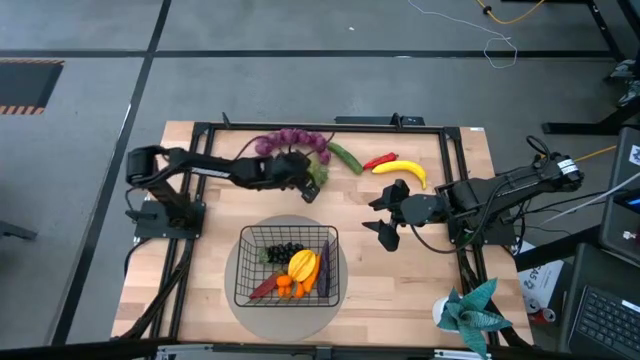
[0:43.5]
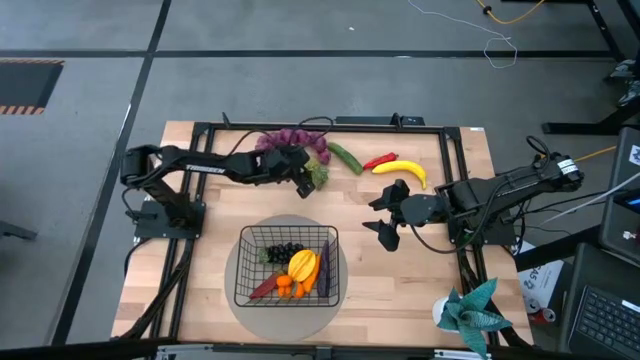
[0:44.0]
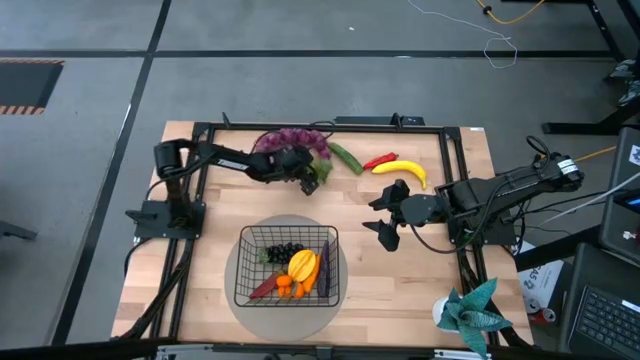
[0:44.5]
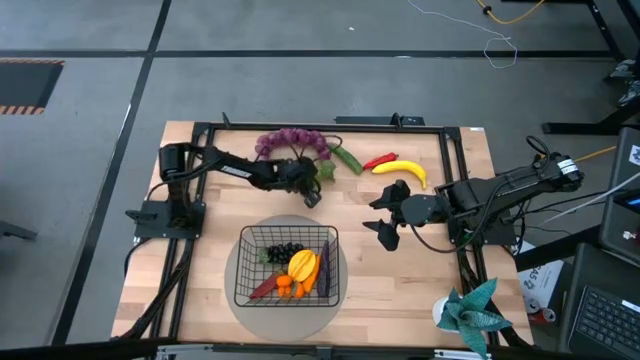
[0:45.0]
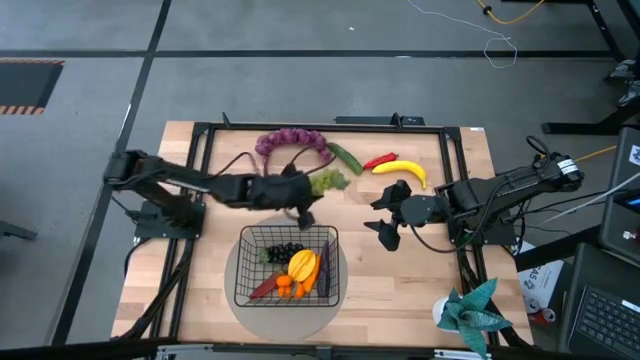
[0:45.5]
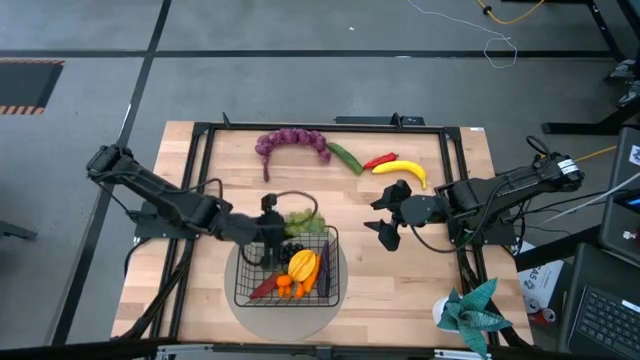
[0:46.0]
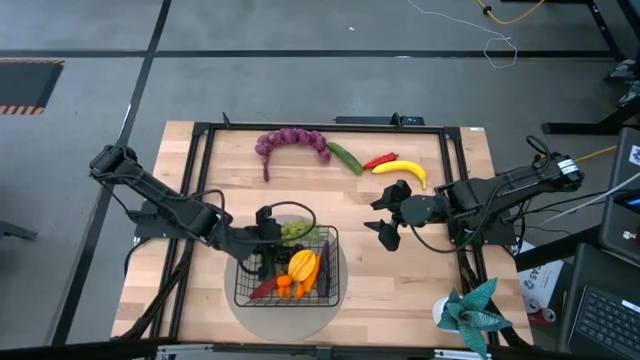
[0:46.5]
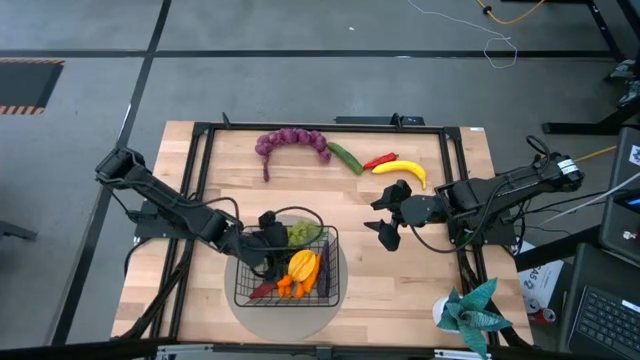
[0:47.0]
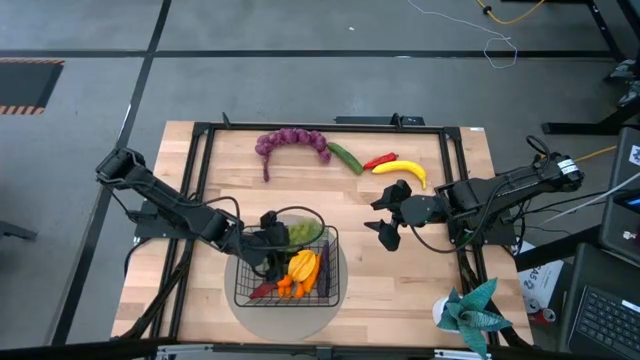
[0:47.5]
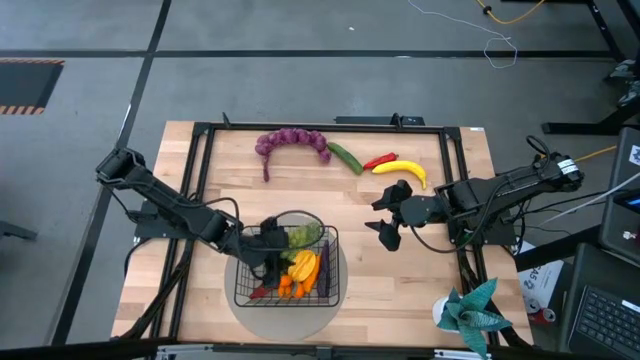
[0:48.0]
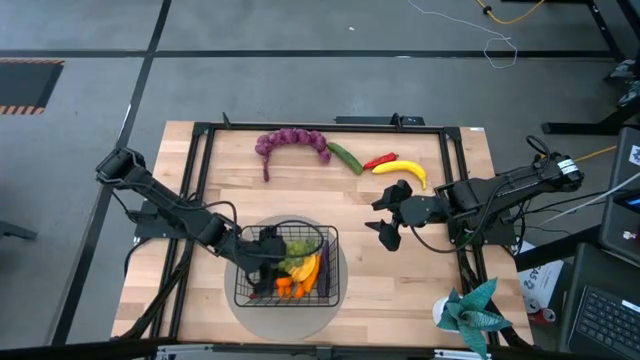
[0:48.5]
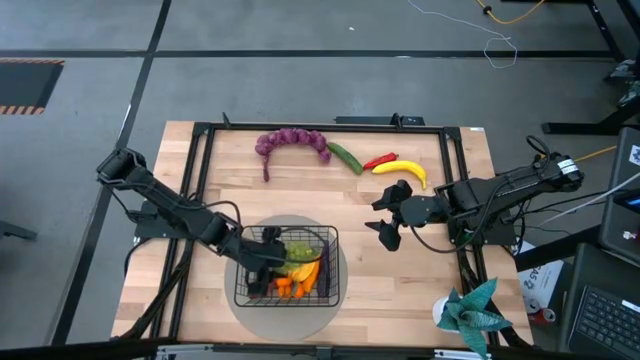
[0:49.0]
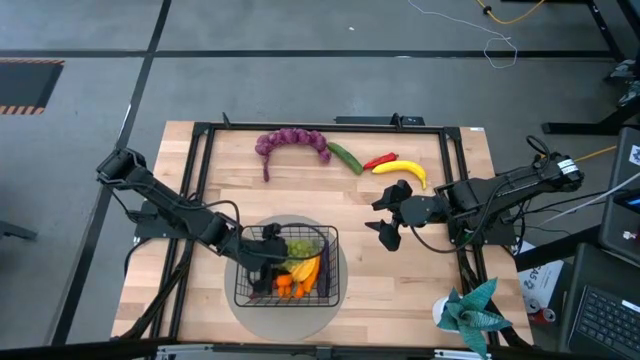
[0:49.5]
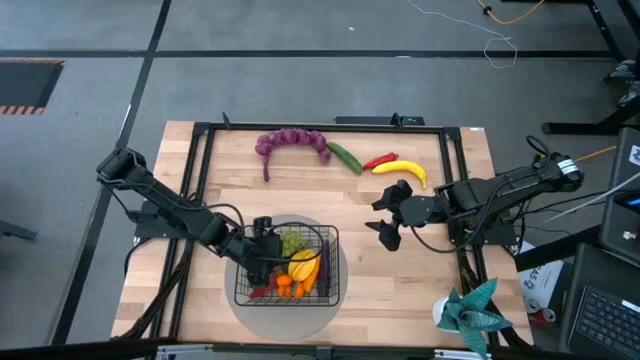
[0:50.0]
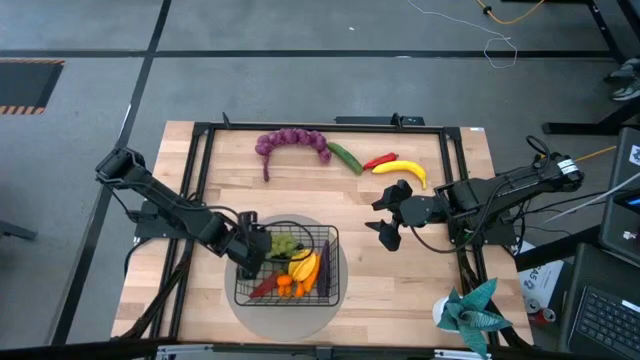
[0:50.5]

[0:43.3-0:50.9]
Task: Build produce basket
Put the green grapes into the black wire basket

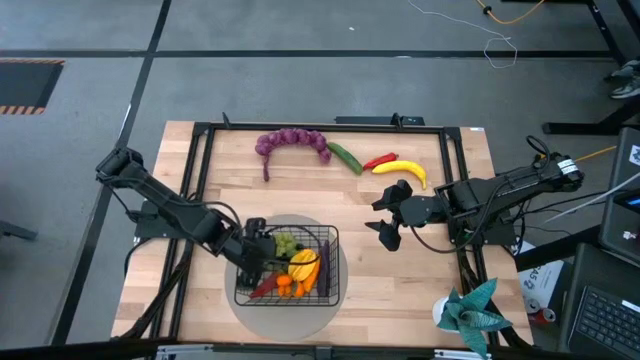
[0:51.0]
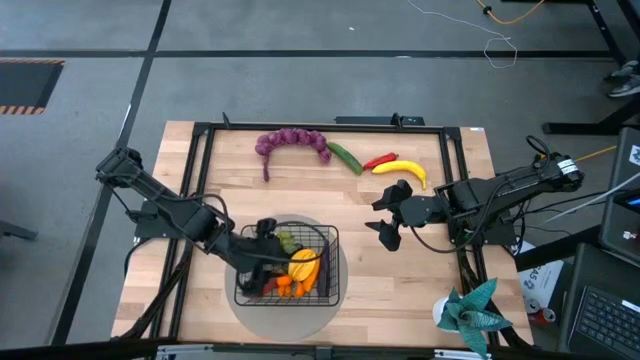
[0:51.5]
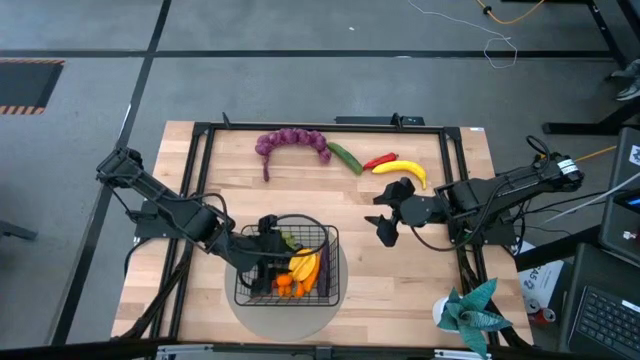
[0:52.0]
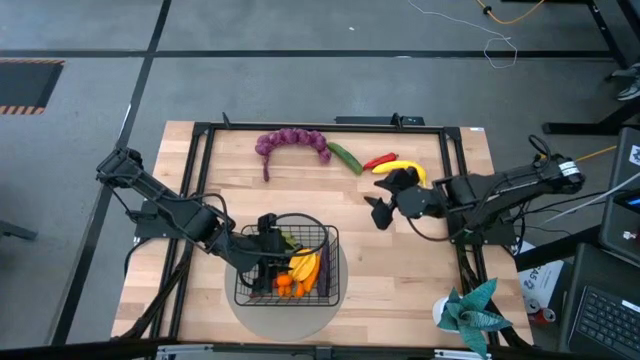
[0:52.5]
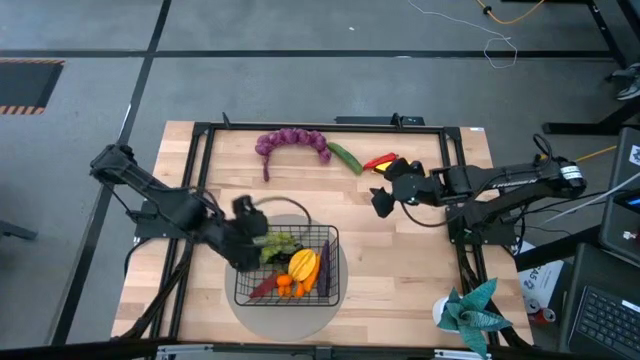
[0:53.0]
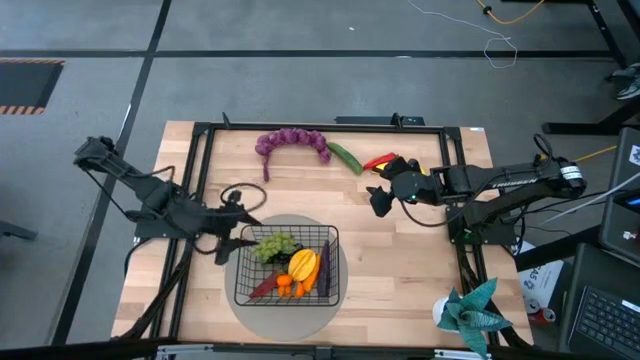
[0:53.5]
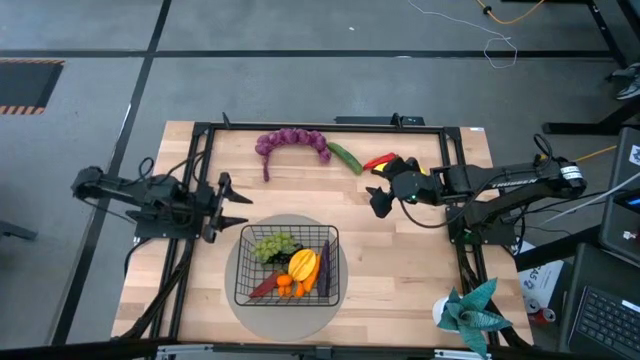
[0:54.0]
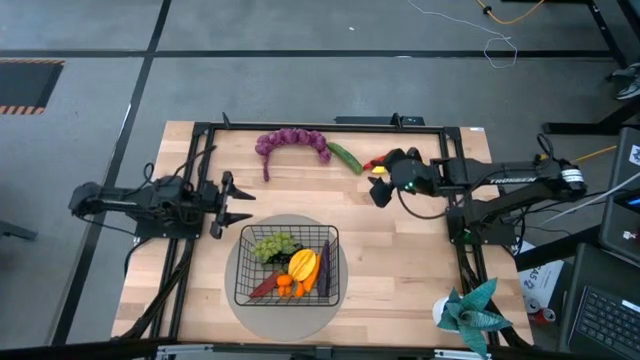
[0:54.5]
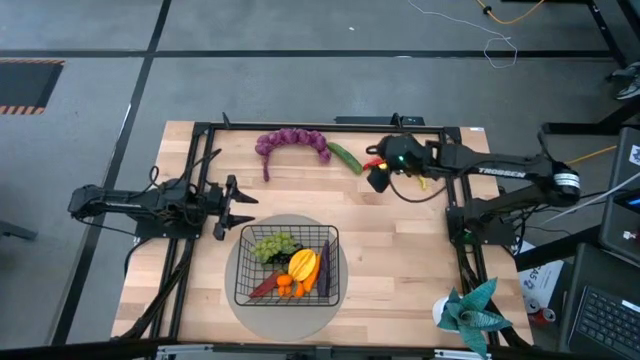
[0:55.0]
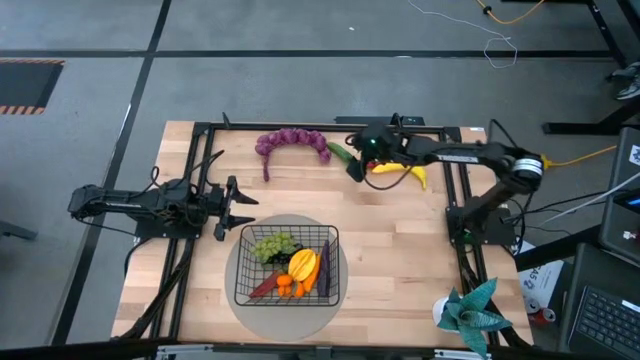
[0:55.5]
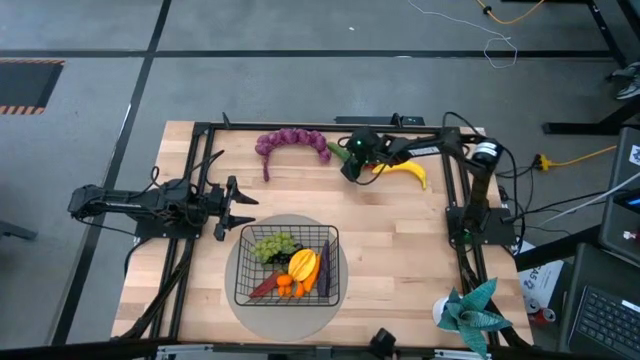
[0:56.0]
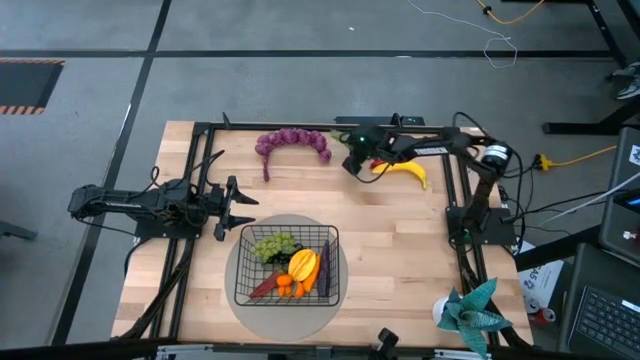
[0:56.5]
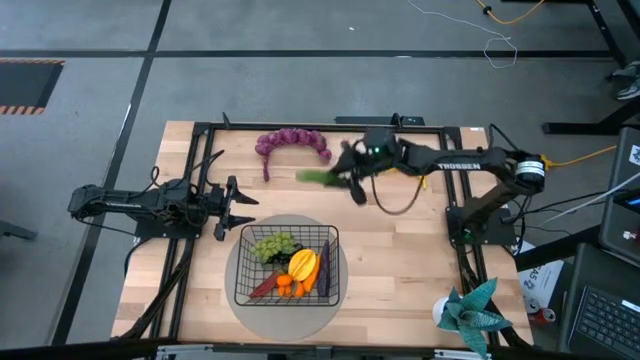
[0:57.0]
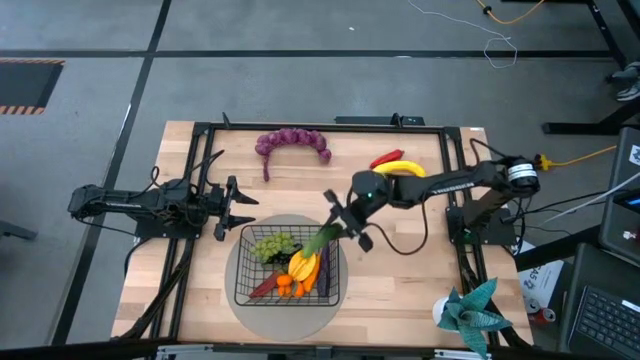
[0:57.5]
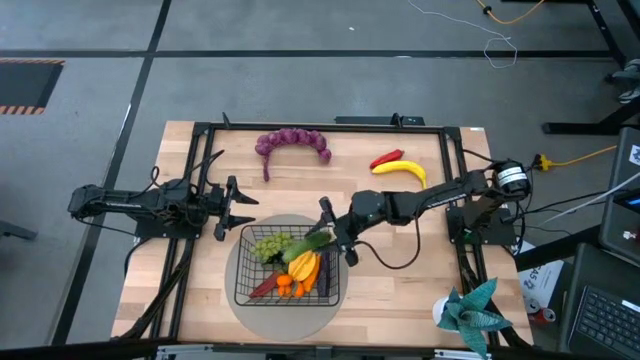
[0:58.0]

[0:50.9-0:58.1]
Put the cucumber into the black wire basket

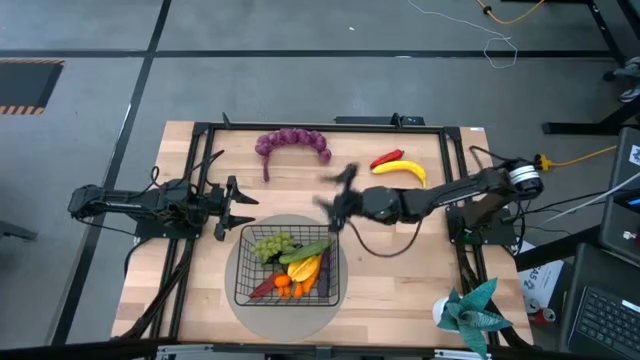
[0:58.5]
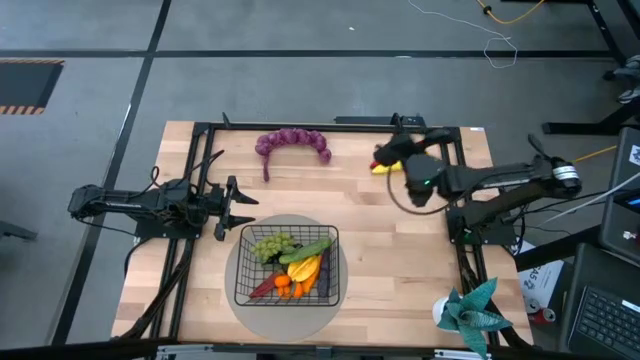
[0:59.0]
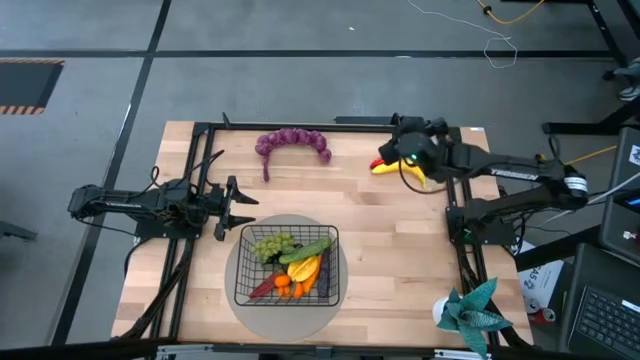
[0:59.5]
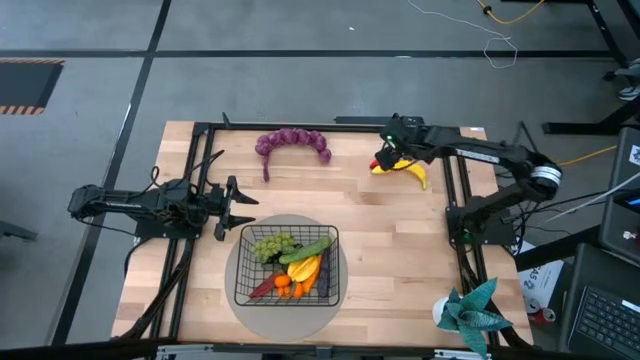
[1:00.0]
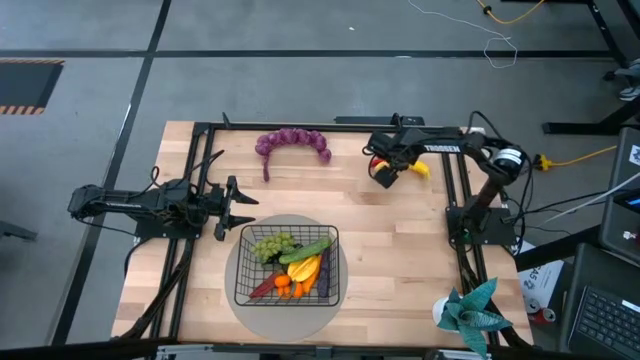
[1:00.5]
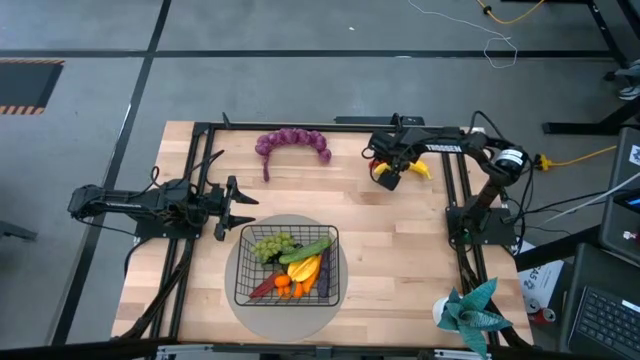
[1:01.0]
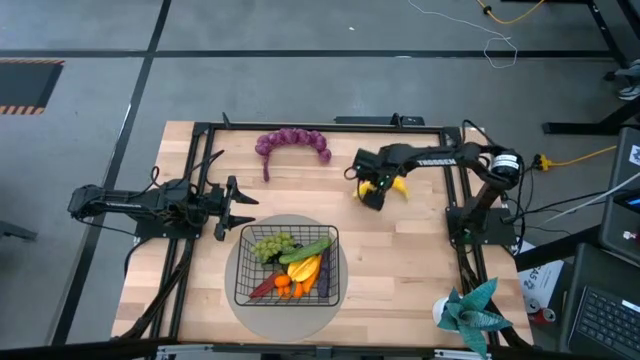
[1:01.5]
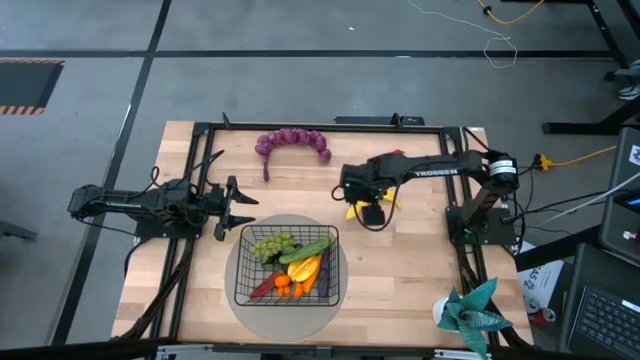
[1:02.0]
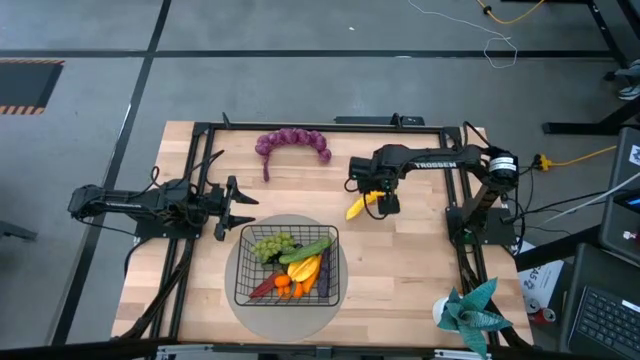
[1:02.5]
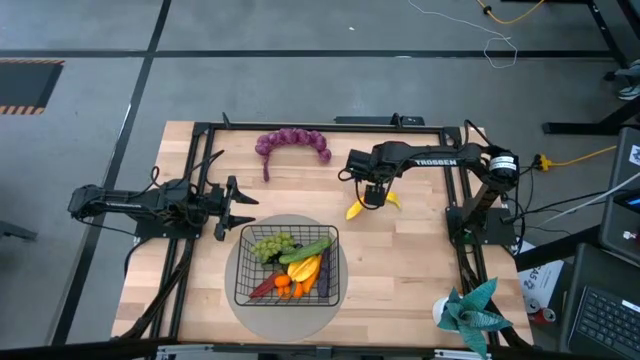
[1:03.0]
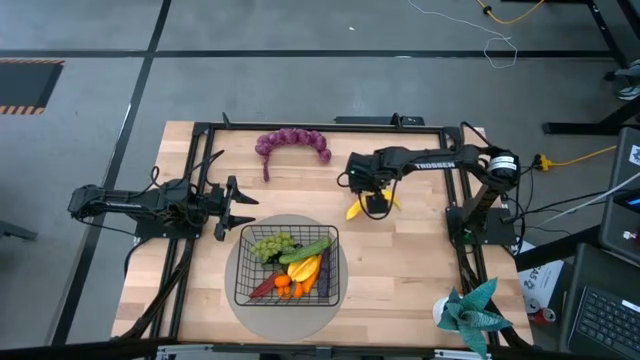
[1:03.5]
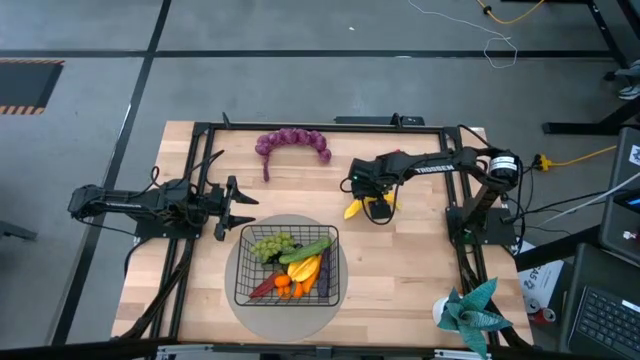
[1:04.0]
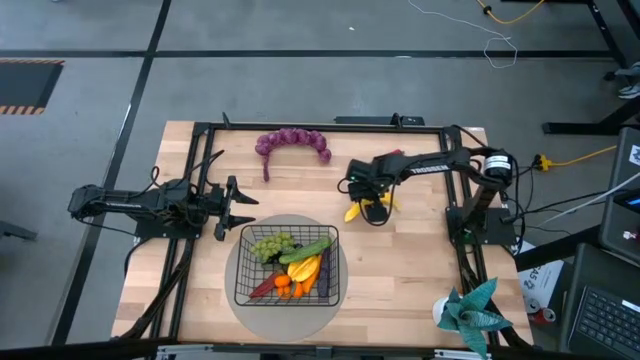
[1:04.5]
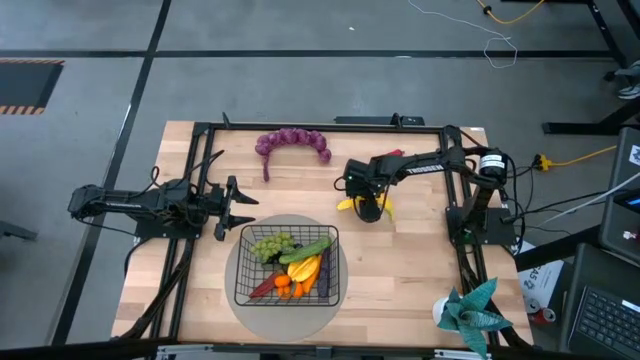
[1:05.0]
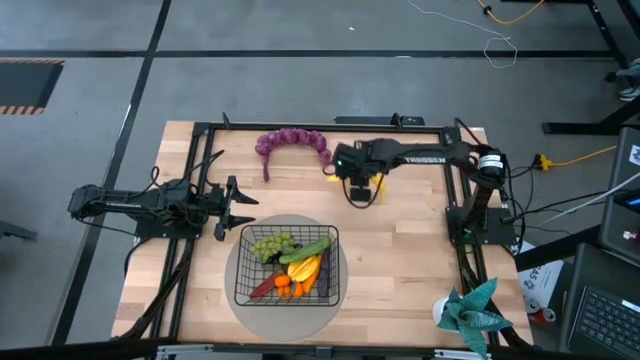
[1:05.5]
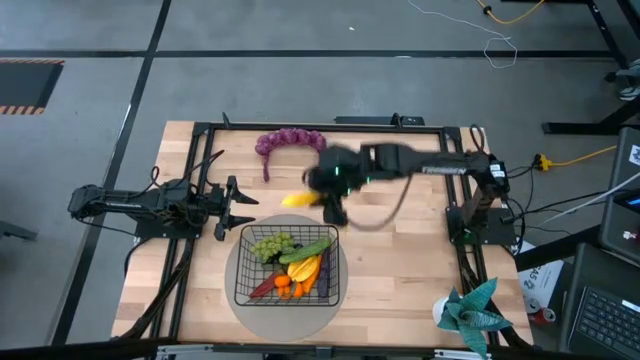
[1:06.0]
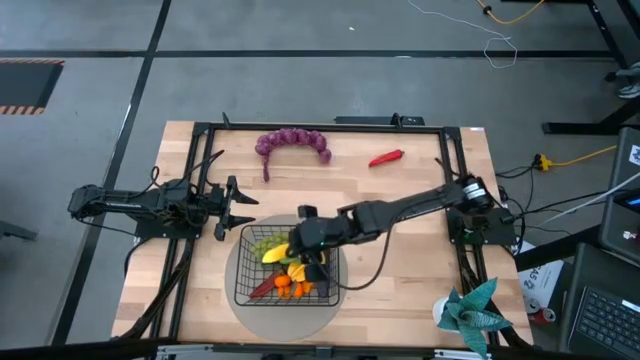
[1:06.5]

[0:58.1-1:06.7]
Put the banana into the black wire basket
